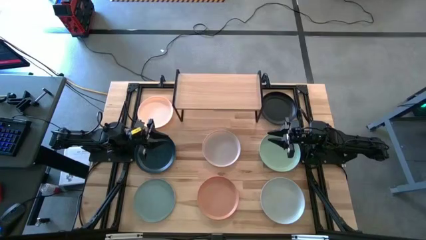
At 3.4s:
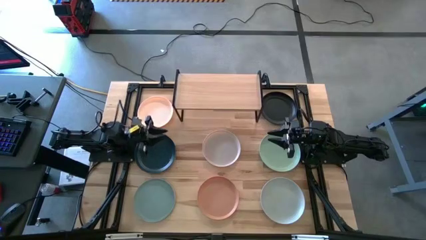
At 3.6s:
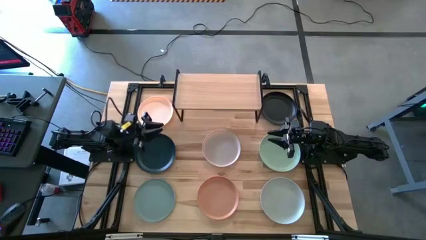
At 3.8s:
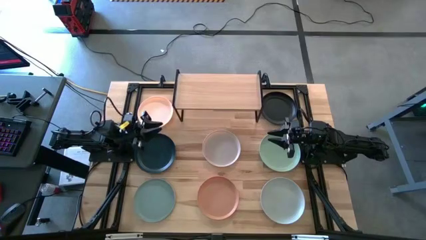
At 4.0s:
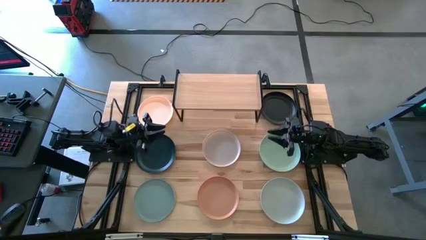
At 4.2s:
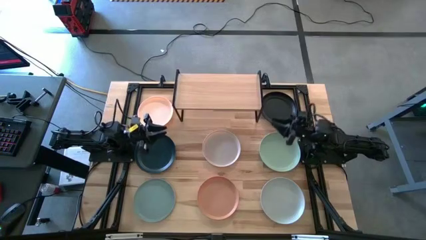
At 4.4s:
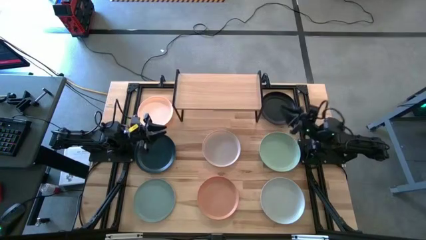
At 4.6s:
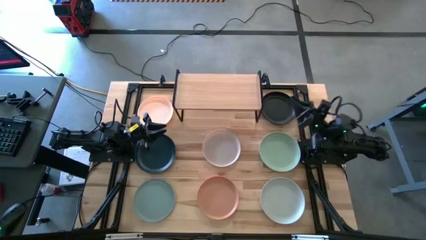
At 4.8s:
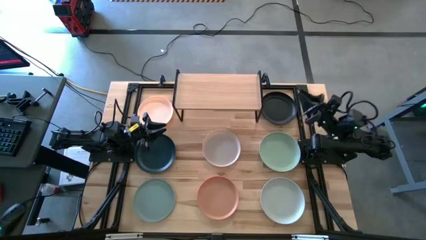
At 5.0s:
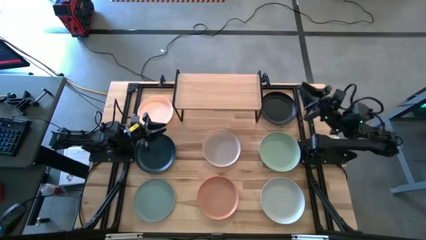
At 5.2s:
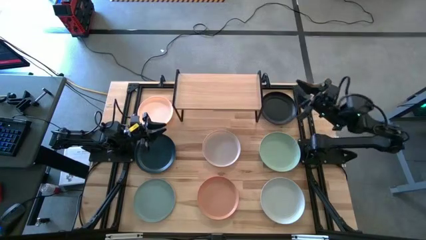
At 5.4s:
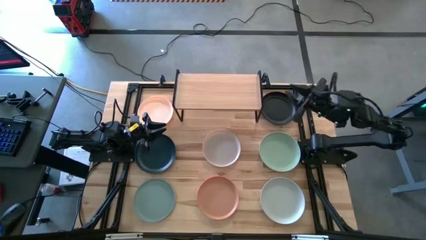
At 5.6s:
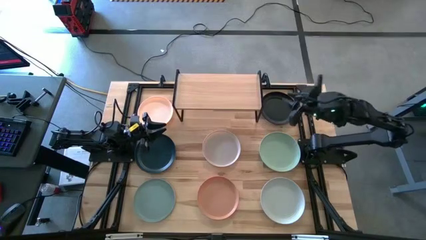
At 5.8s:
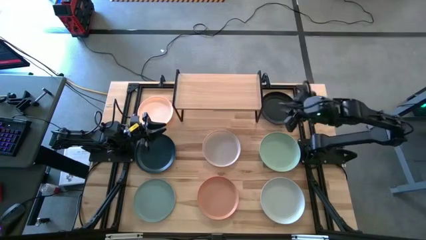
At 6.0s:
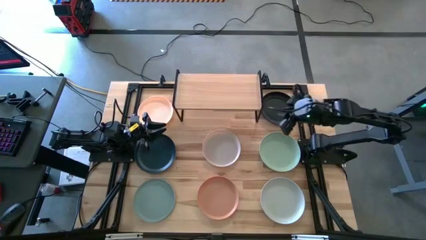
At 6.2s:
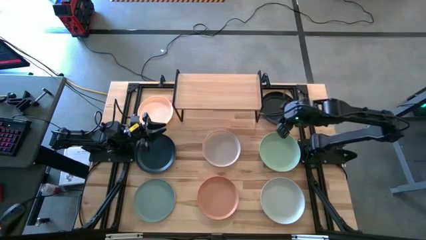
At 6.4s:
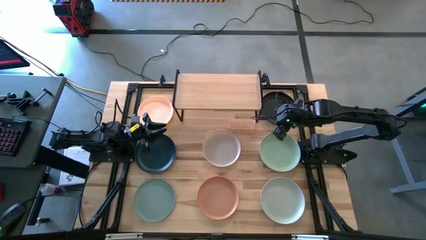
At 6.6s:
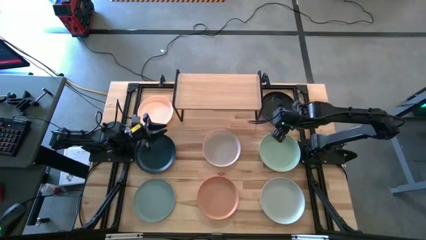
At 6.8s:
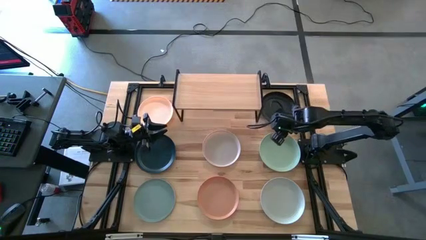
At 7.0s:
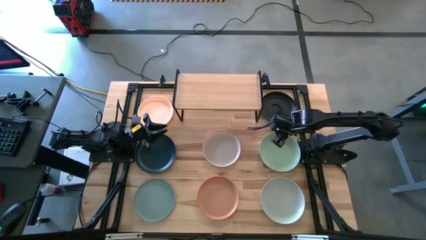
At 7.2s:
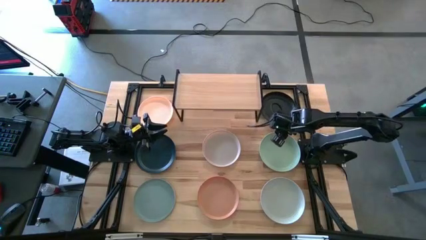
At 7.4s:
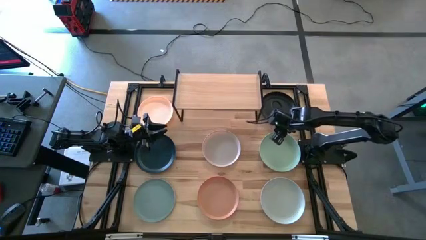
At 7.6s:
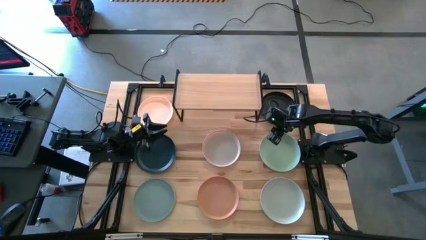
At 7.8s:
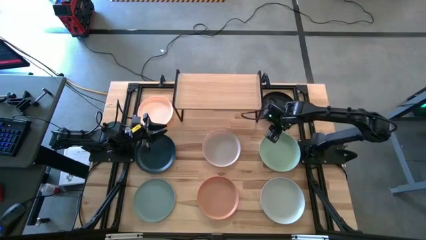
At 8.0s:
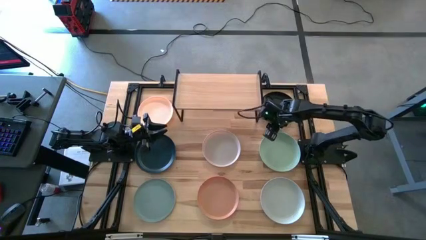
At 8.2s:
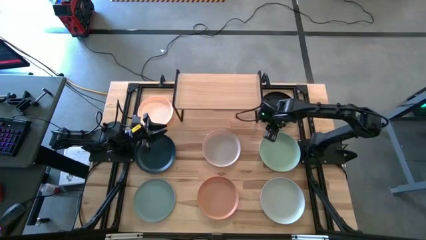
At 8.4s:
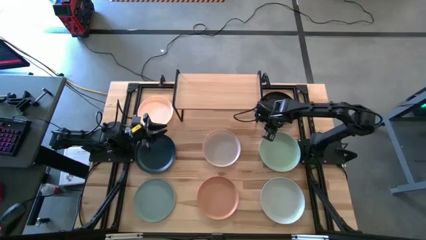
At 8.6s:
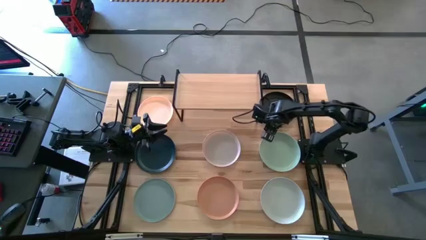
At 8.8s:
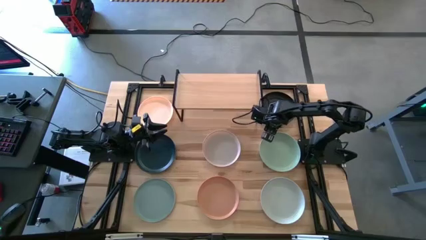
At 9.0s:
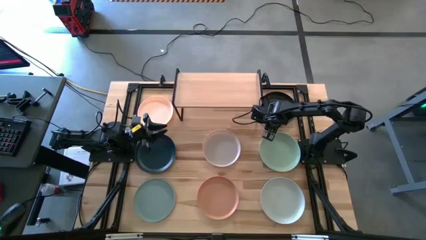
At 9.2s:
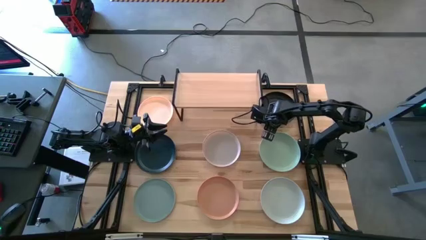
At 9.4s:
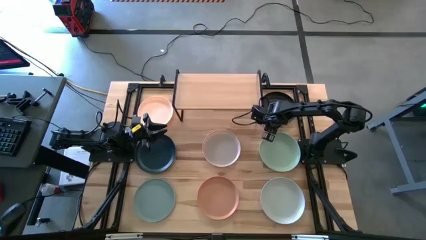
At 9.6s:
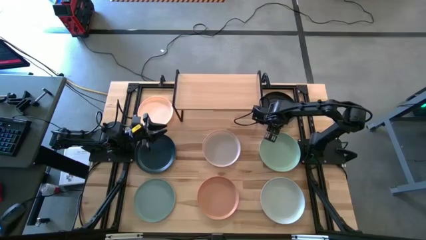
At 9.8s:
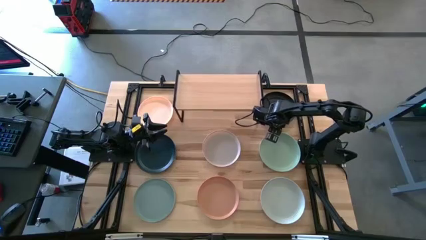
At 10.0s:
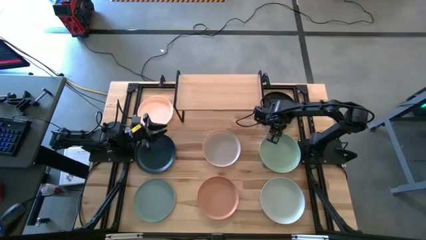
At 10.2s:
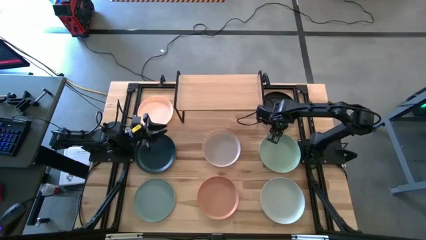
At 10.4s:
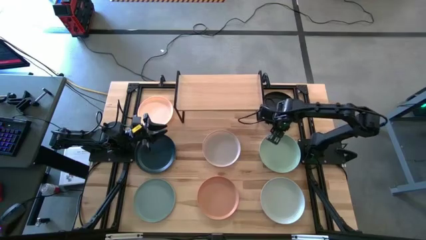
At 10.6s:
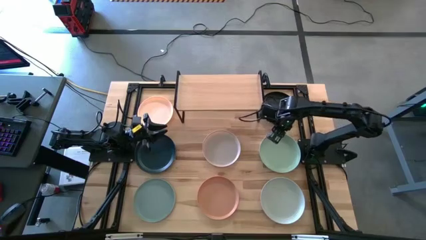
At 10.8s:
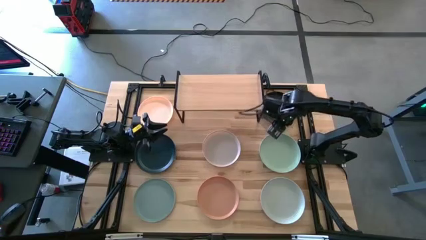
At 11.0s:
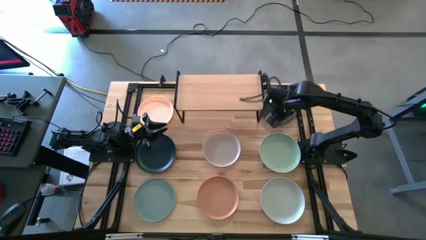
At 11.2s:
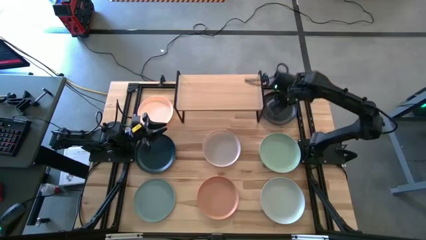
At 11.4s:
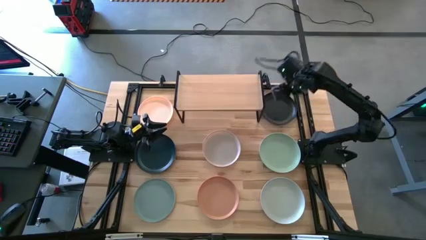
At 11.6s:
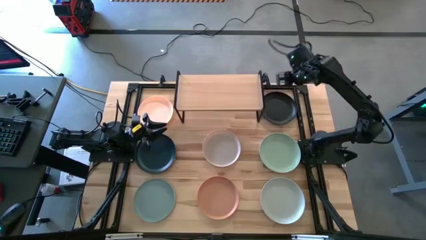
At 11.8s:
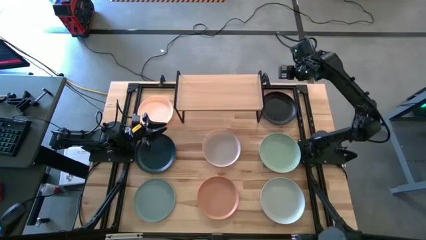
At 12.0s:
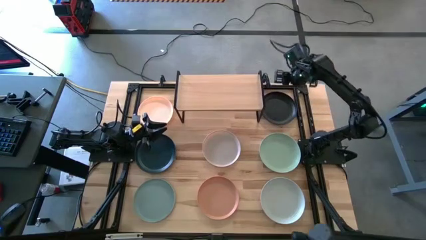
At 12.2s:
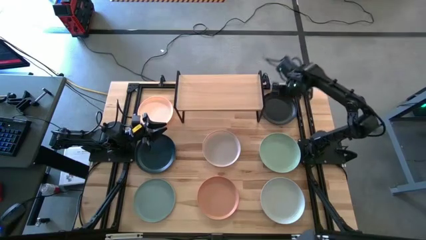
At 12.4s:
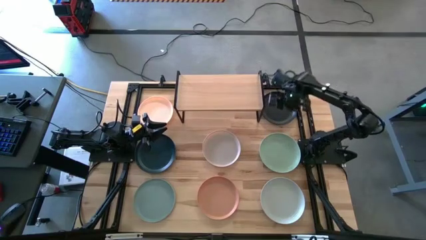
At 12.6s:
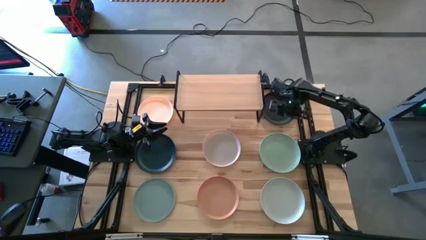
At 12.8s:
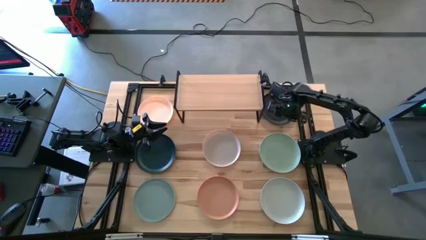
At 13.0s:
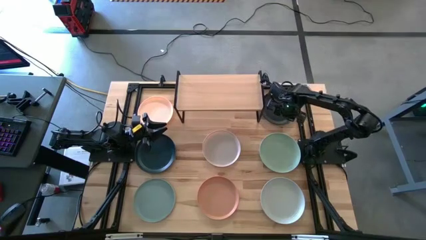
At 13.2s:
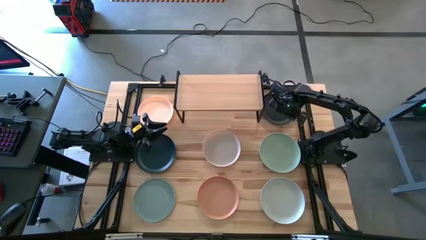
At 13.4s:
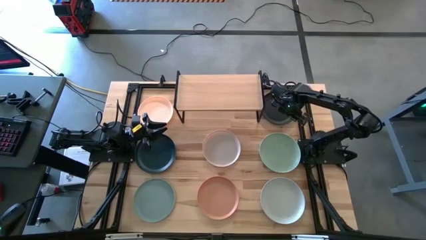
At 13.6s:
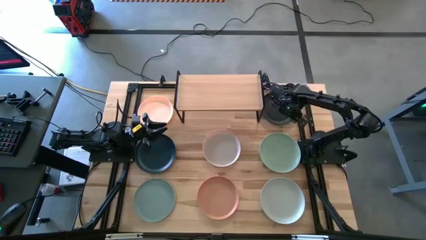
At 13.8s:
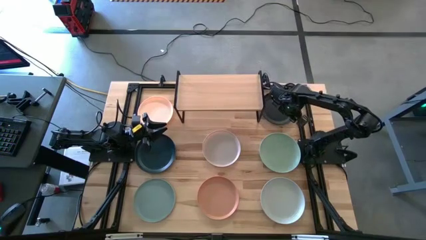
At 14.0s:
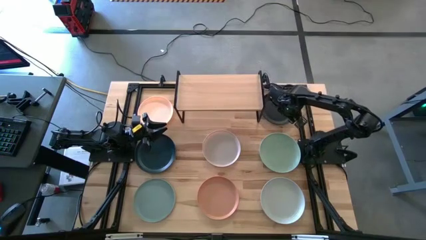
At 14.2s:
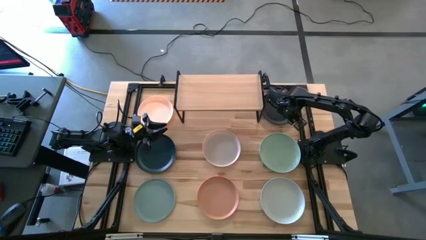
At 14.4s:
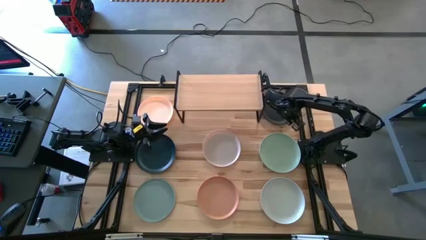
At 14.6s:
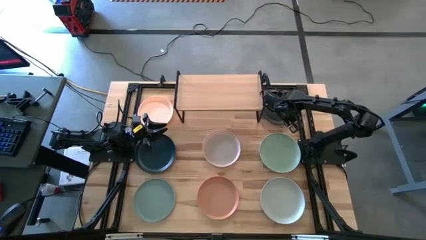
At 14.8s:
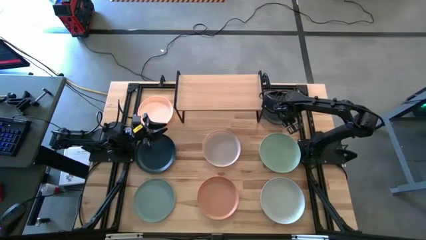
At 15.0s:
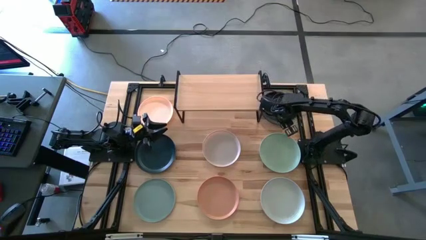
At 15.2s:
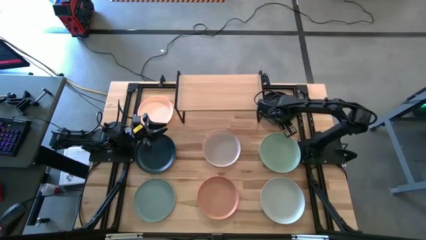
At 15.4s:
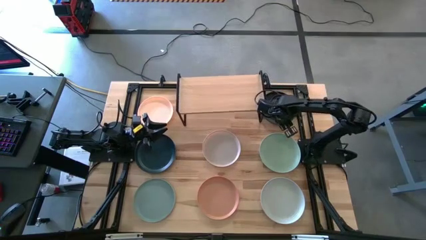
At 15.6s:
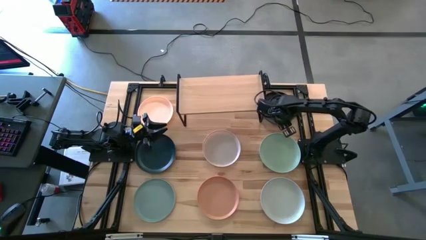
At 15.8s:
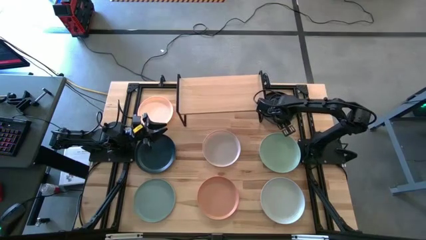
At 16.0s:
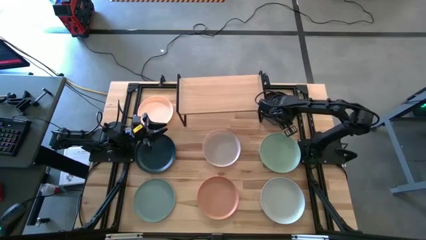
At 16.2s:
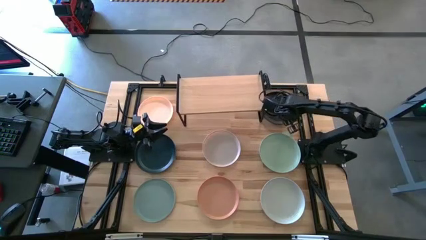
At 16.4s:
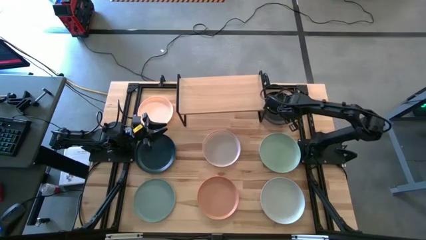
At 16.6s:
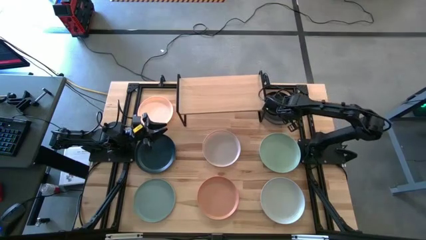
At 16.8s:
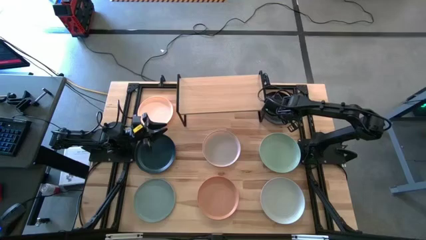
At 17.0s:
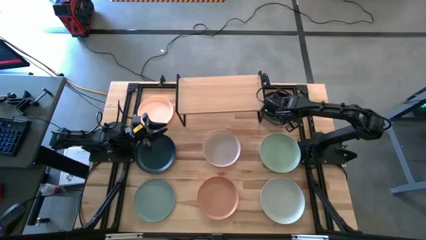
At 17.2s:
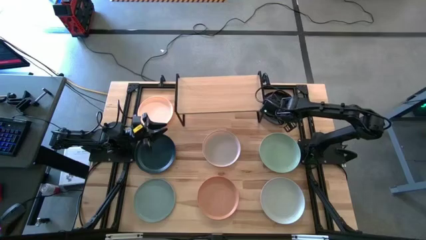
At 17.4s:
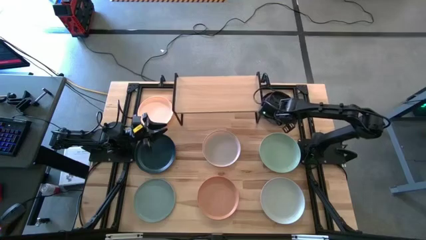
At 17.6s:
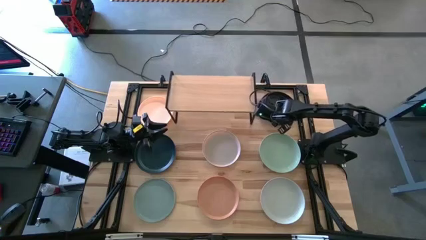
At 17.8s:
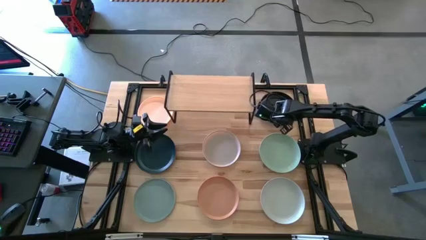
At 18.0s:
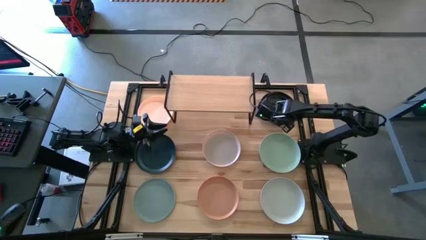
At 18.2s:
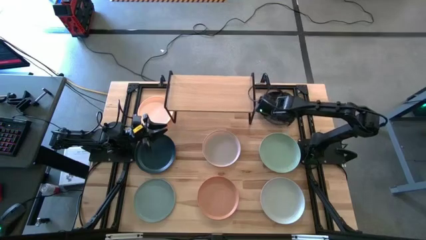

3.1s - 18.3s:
Task: Place and stack plates onto a shelf
Put the black plate on the shelf
